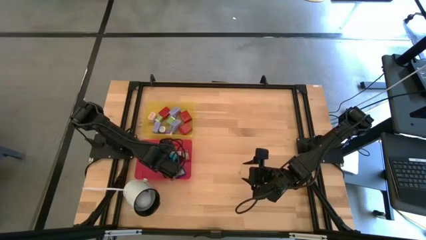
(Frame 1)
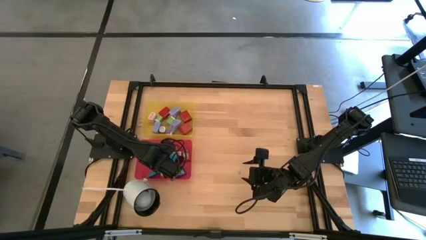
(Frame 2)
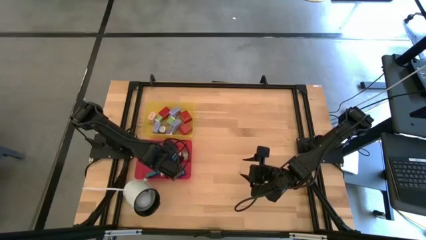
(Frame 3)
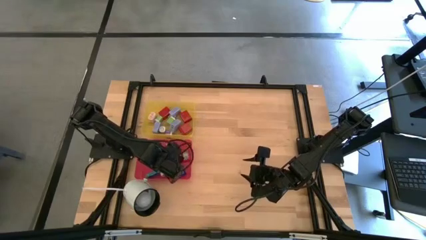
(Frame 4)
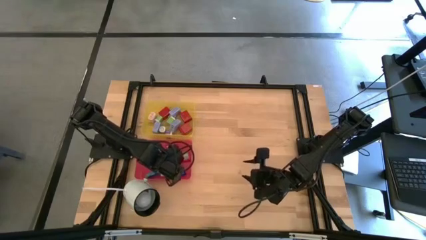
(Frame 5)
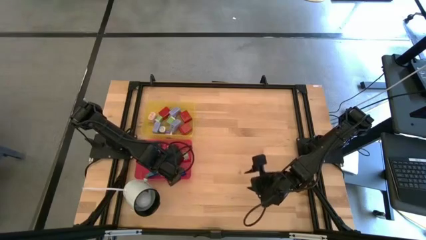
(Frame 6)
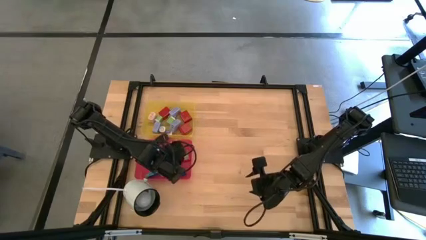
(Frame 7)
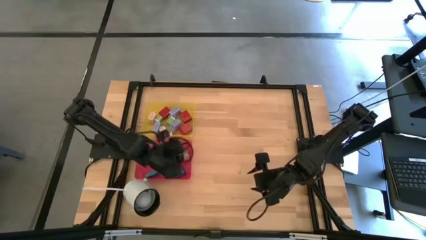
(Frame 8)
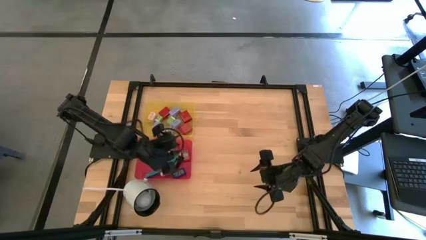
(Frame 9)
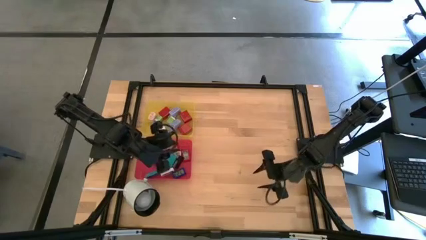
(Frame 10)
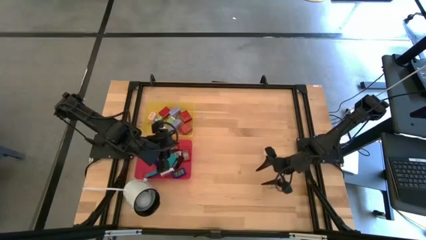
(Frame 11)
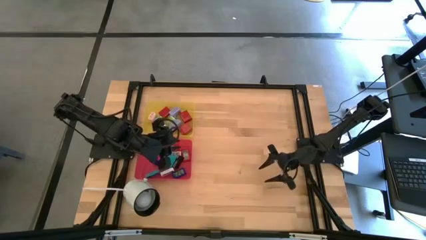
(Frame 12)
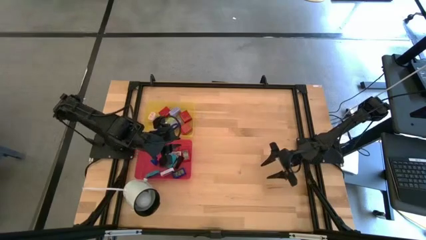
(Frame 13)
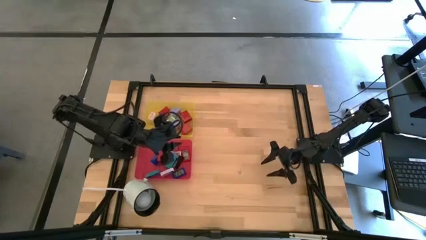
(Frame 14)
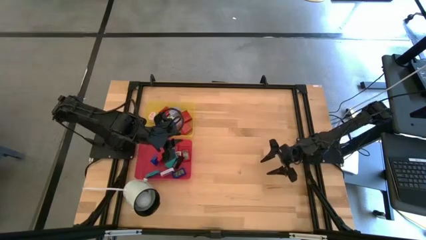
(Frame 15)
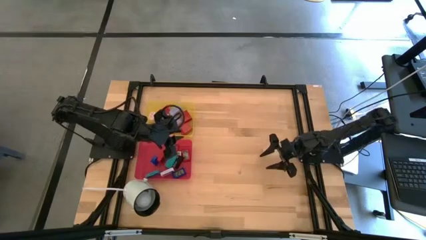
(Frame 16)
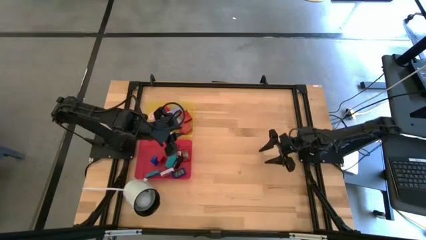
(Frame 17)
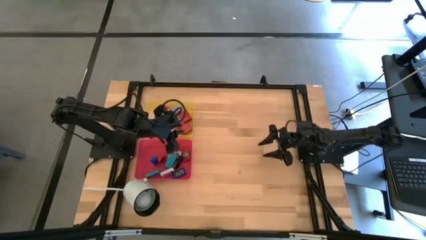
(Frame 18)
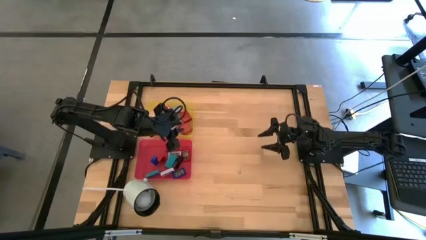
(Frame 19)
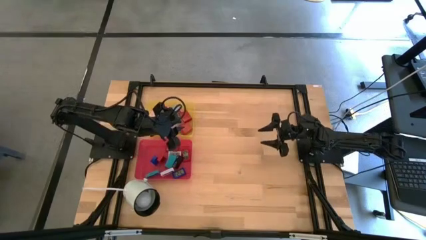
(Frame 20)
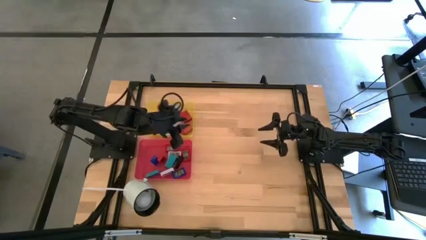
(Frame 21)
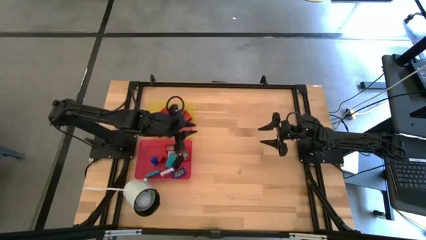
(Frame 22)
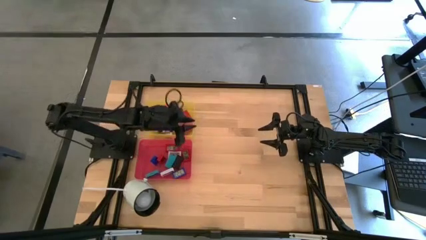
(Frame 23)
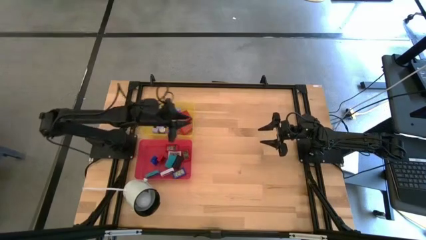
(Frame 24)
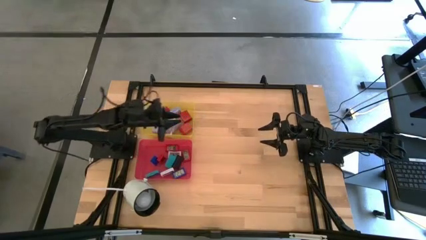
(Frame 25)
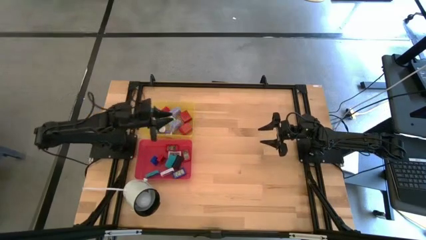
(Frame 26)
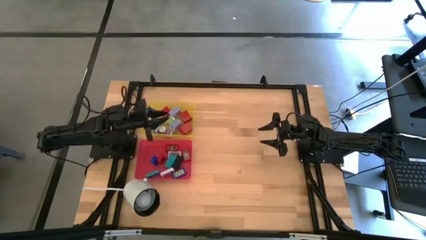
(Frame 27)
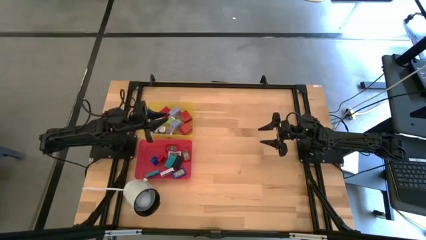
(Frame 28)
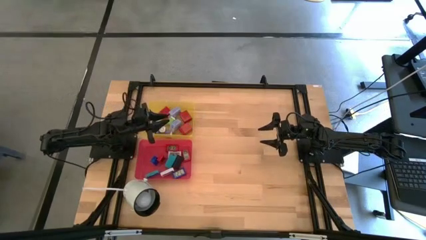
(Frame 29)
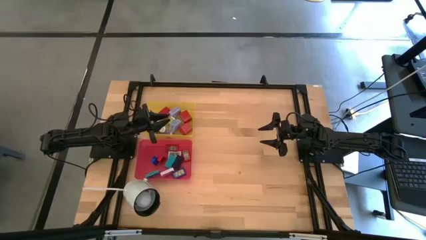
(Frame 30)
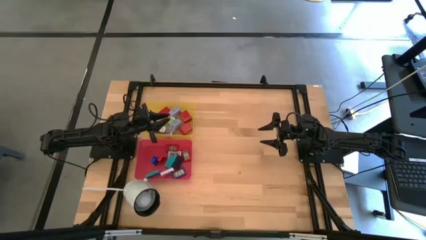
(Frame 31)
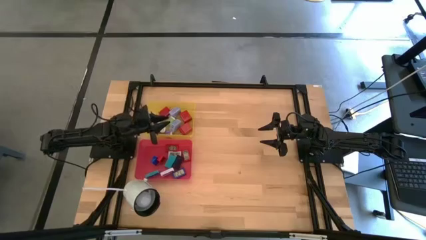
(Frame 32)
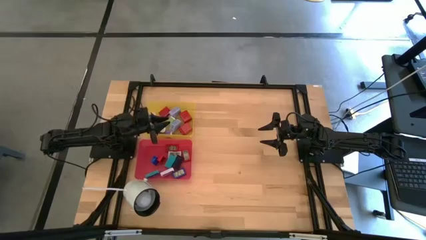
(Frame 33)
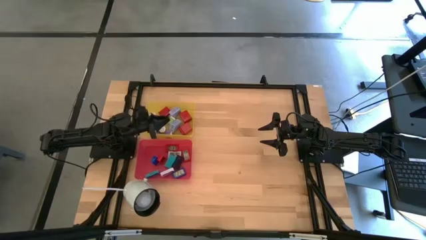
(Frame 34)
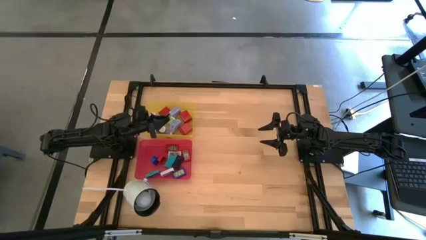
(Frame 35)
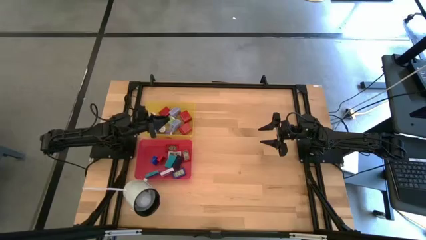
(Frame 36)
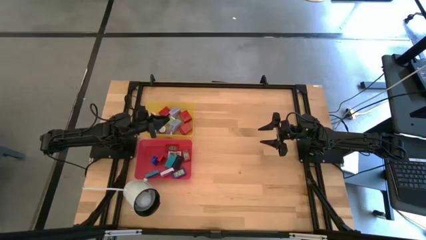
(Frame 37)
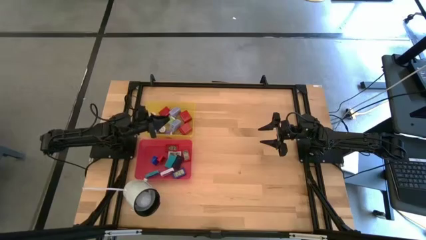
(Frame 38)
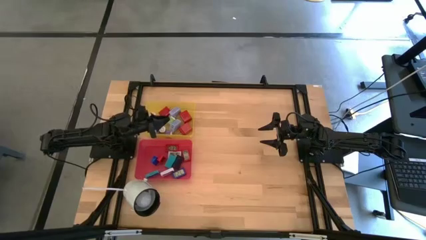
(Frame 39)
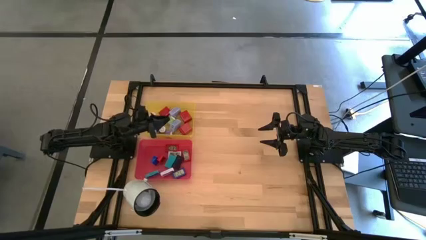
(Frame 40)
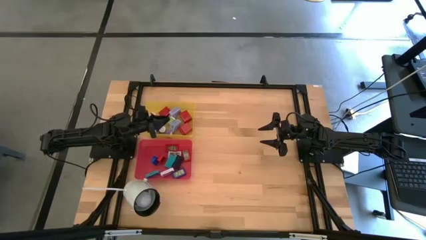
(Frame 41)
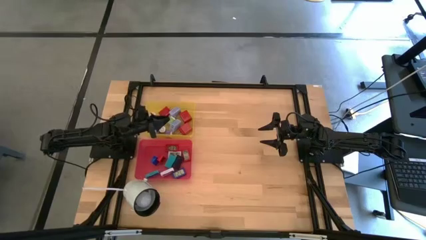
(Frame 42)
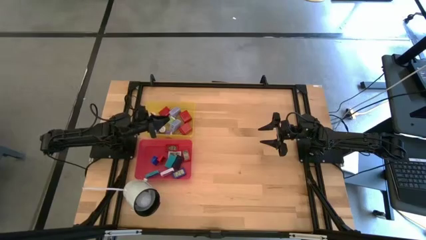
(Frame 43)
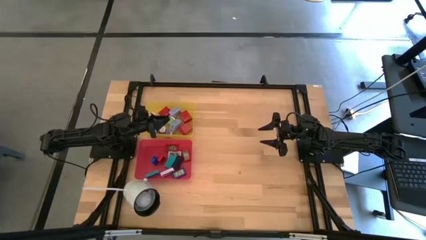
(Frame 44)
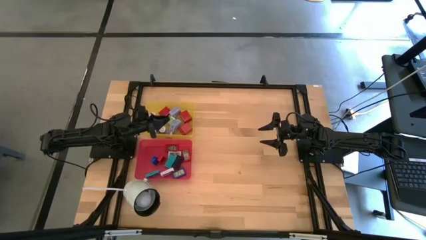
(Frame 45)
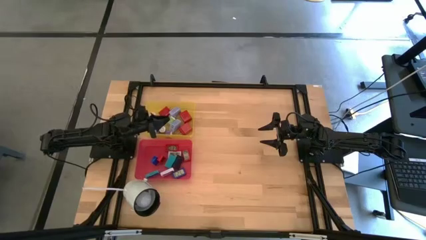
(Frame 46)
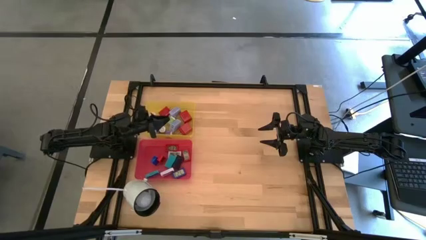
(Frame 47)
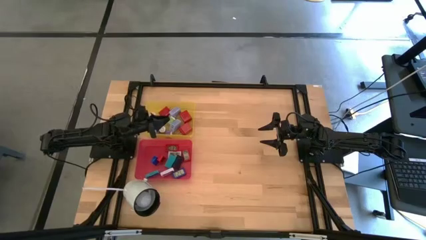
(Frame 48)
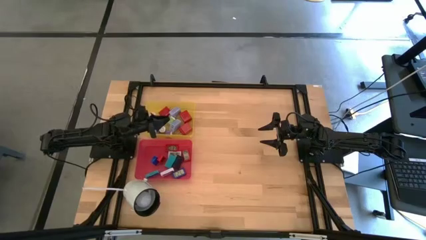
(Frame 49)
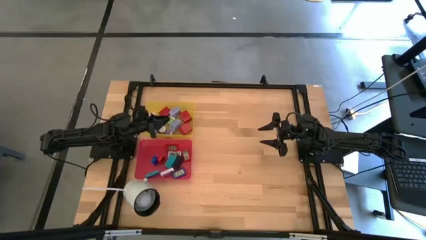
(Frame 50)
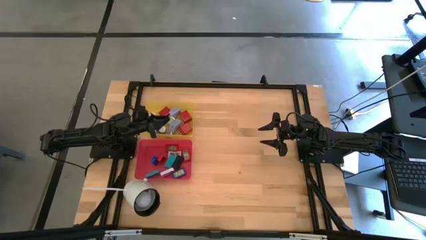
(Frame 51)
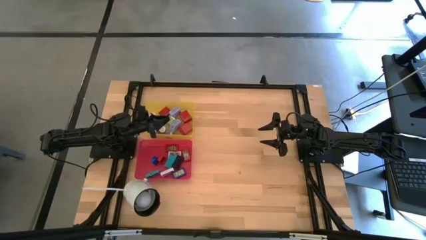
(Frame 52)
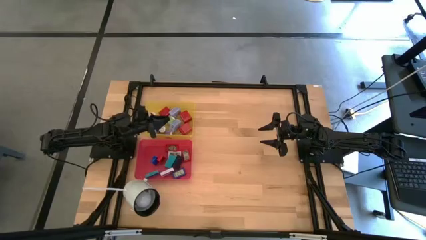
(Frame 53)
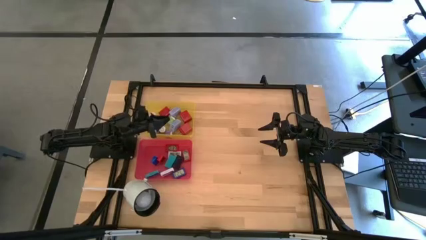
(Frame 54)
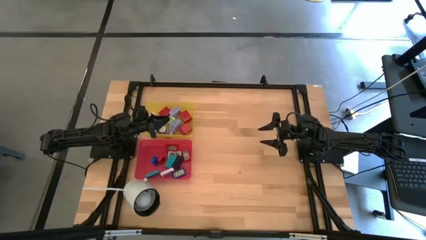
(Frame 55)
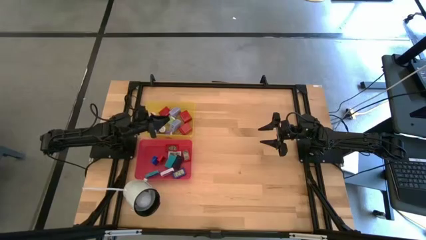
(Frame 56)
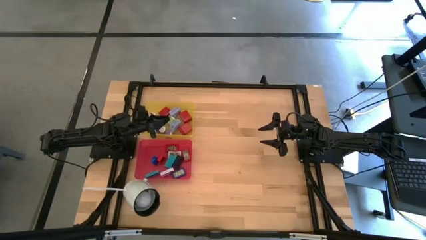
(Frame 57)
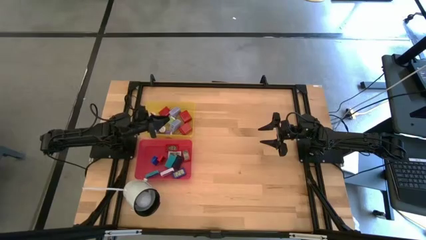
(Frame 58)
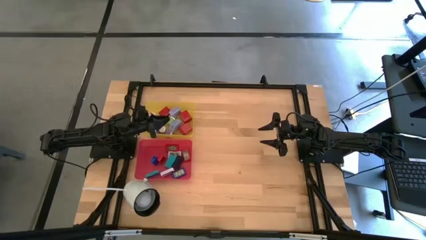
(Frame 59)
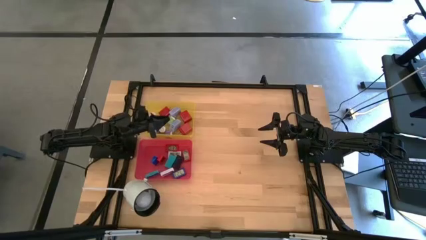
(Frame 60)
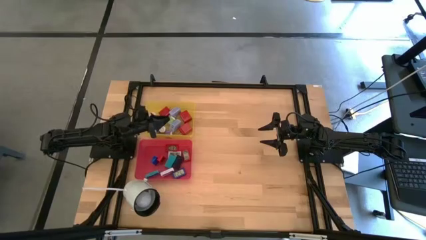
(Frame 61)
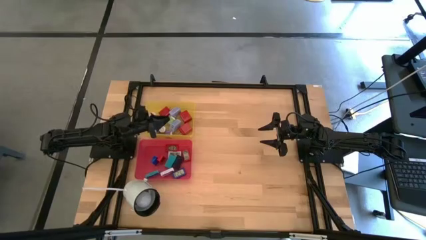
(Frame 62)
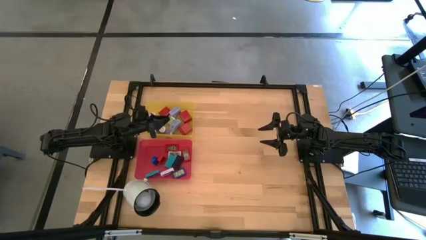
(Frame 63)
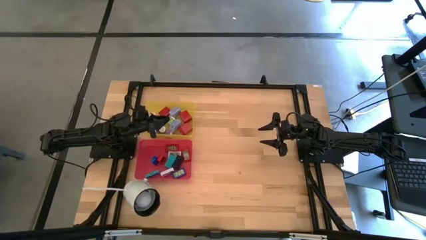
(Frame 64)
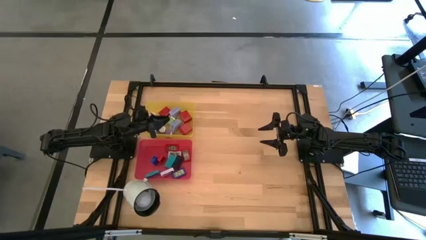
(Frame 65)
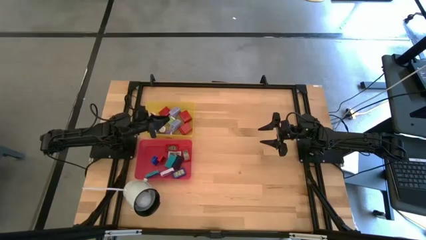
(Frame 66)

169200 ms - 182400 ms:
Task: Pick & Place Office items
Return to Home Position
